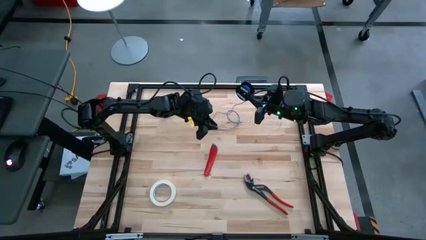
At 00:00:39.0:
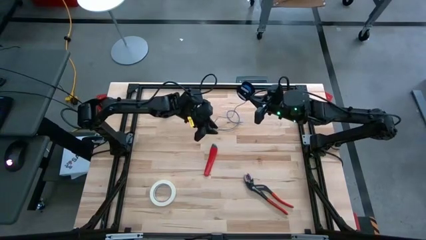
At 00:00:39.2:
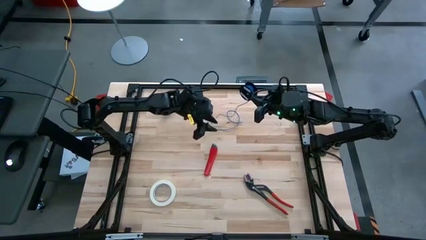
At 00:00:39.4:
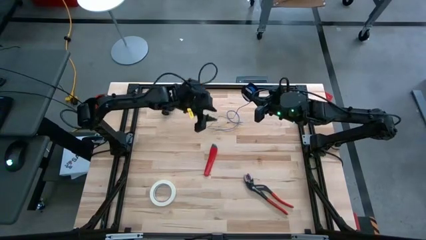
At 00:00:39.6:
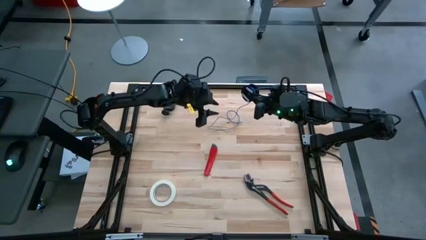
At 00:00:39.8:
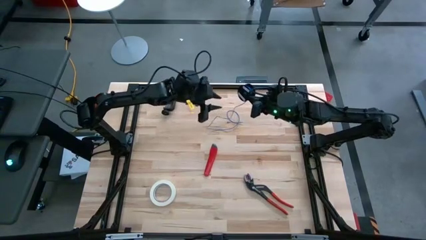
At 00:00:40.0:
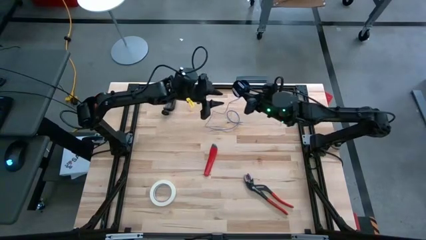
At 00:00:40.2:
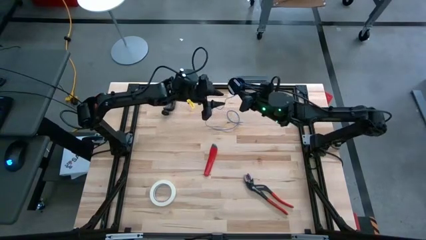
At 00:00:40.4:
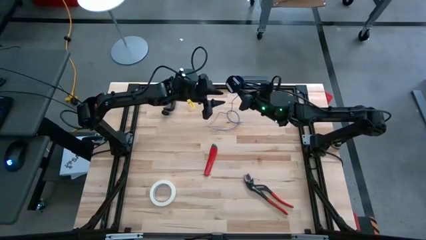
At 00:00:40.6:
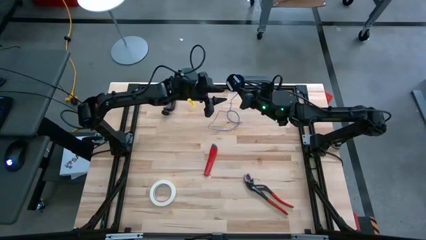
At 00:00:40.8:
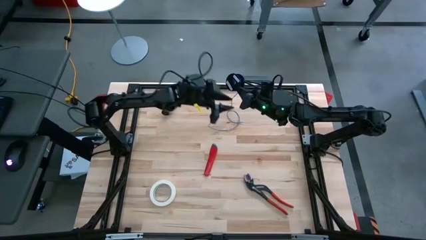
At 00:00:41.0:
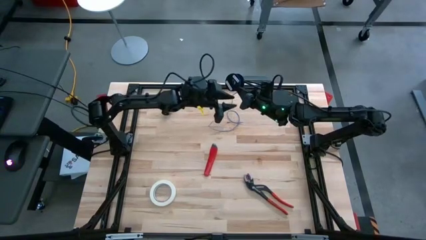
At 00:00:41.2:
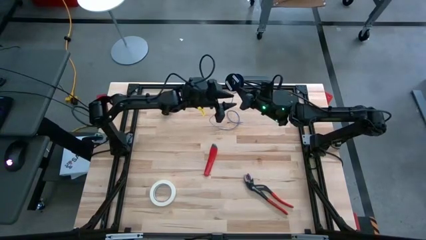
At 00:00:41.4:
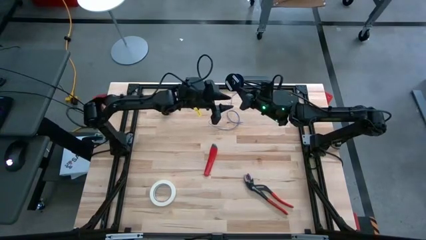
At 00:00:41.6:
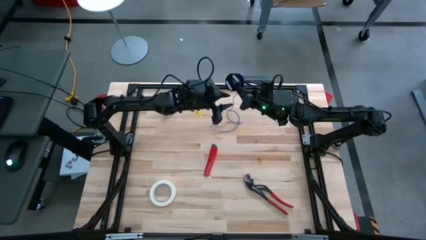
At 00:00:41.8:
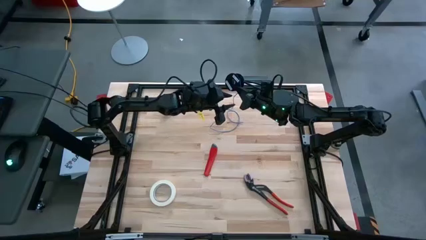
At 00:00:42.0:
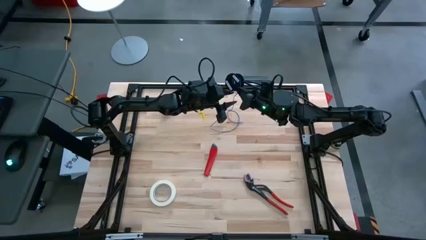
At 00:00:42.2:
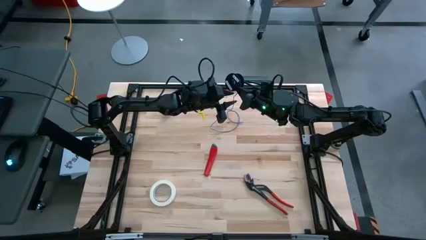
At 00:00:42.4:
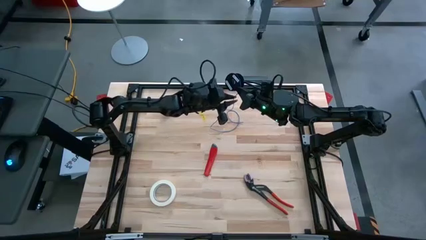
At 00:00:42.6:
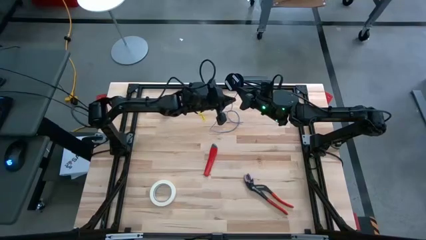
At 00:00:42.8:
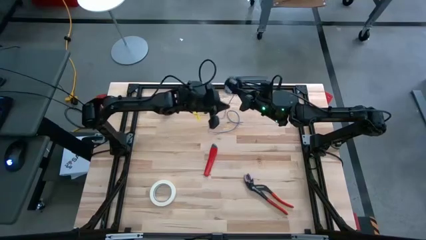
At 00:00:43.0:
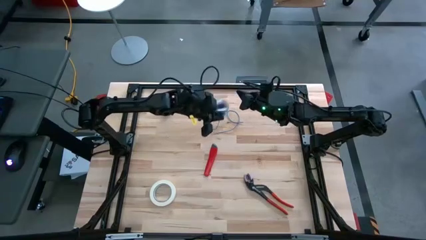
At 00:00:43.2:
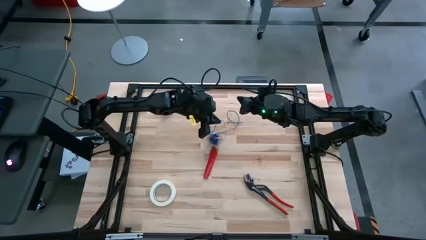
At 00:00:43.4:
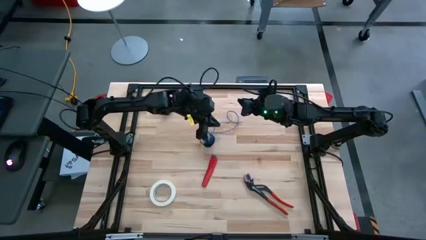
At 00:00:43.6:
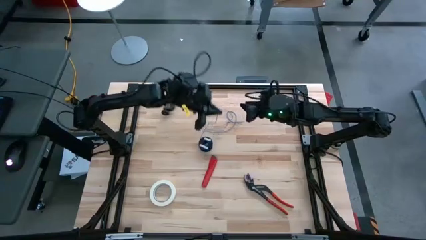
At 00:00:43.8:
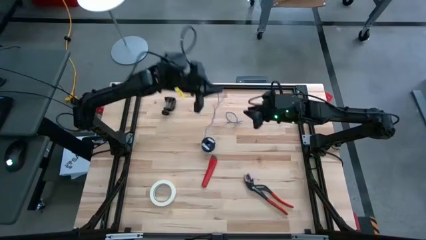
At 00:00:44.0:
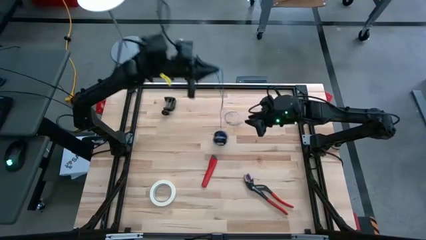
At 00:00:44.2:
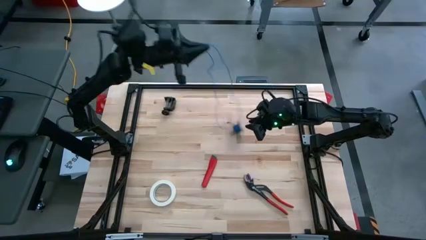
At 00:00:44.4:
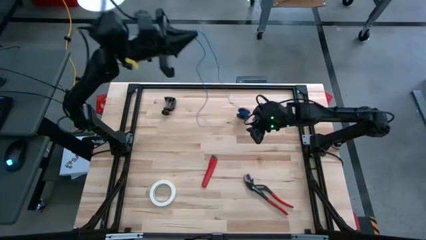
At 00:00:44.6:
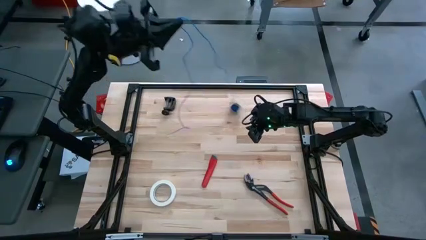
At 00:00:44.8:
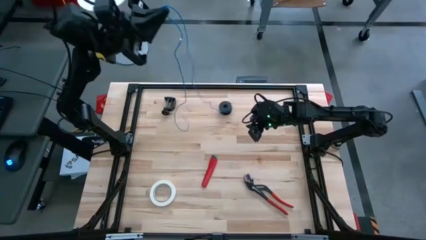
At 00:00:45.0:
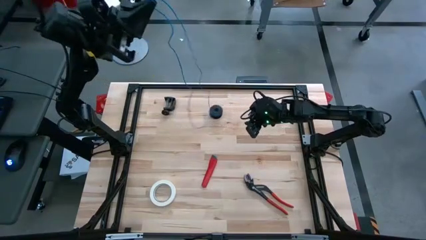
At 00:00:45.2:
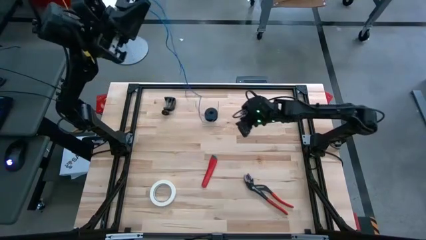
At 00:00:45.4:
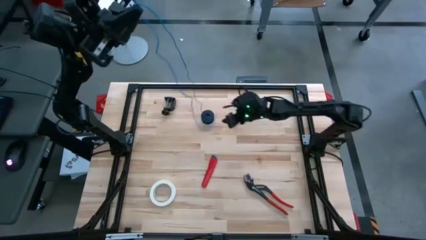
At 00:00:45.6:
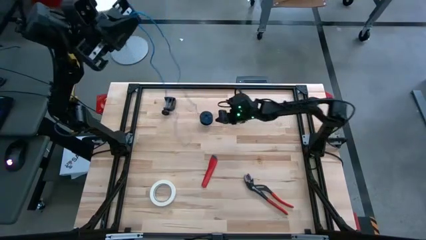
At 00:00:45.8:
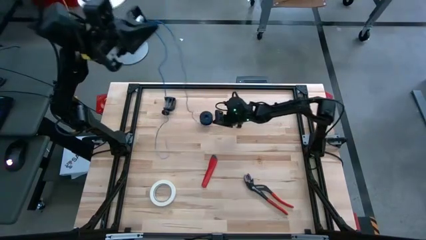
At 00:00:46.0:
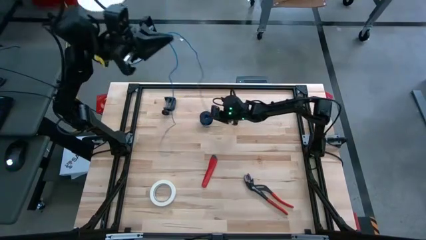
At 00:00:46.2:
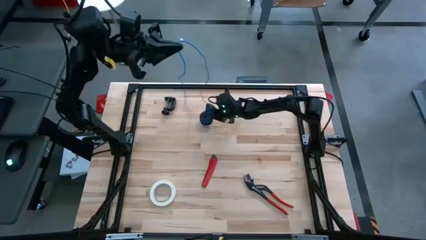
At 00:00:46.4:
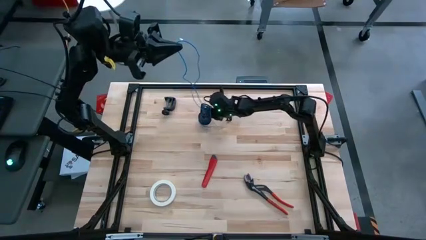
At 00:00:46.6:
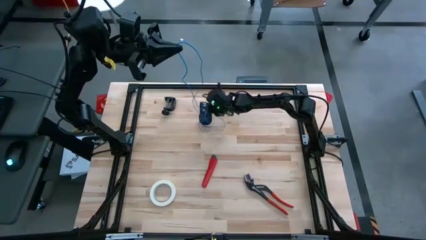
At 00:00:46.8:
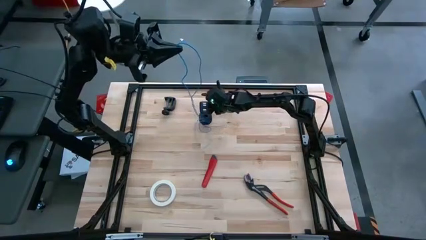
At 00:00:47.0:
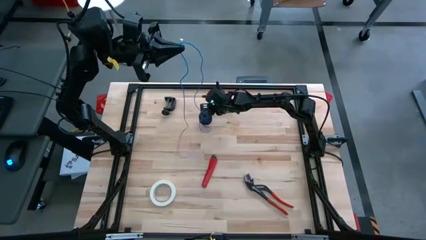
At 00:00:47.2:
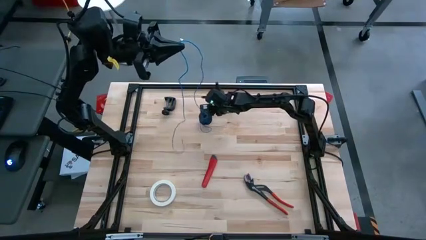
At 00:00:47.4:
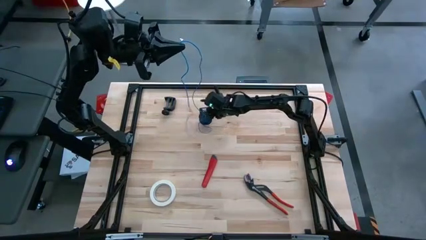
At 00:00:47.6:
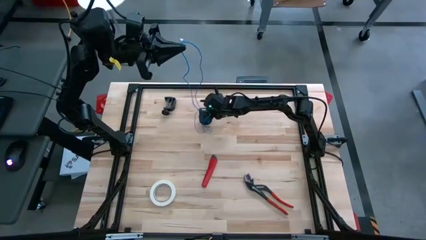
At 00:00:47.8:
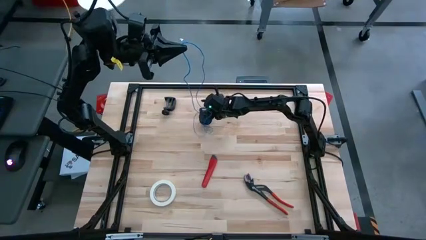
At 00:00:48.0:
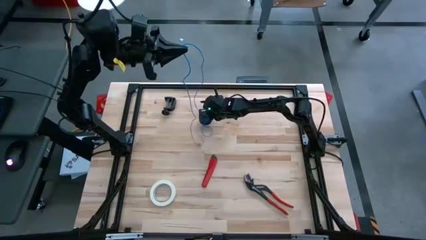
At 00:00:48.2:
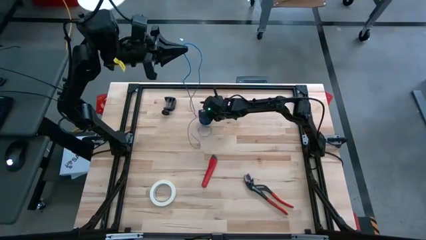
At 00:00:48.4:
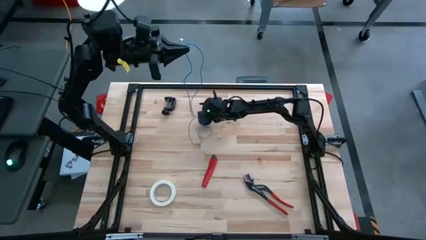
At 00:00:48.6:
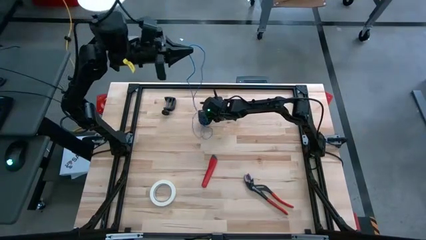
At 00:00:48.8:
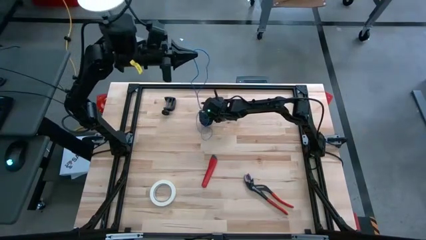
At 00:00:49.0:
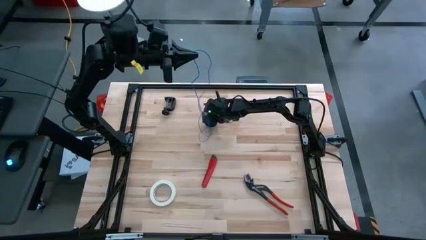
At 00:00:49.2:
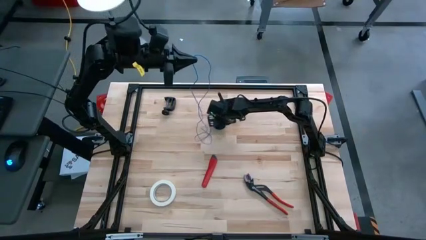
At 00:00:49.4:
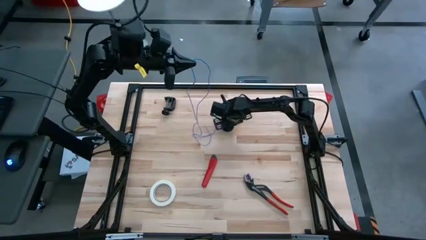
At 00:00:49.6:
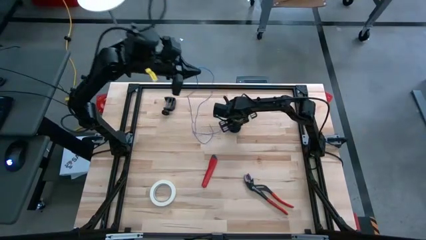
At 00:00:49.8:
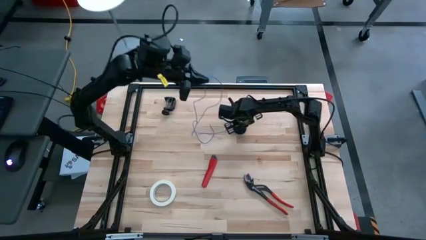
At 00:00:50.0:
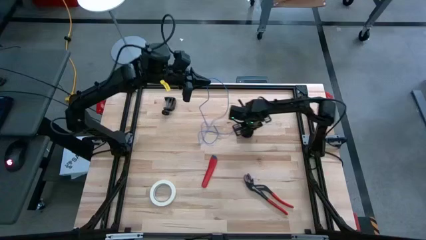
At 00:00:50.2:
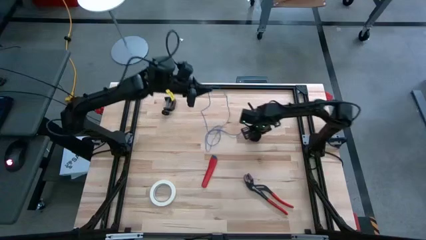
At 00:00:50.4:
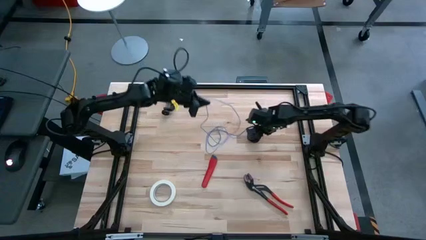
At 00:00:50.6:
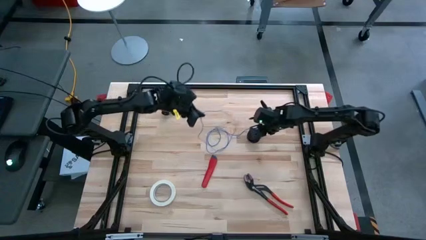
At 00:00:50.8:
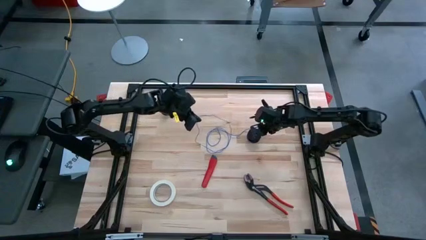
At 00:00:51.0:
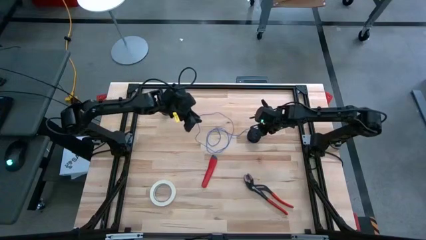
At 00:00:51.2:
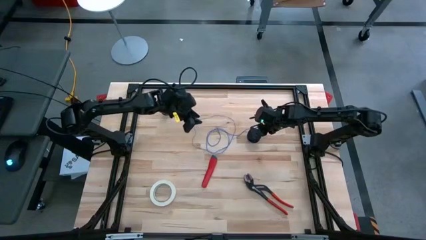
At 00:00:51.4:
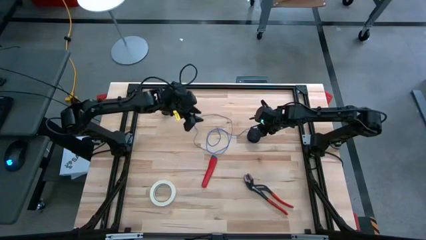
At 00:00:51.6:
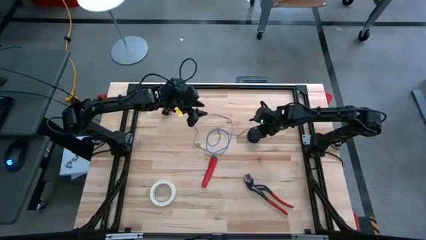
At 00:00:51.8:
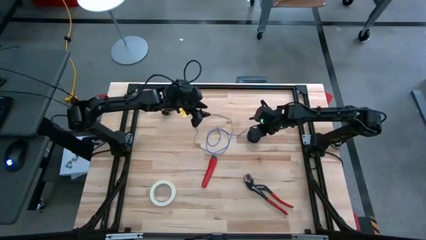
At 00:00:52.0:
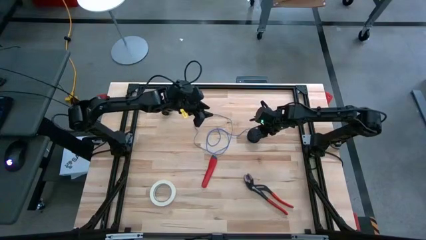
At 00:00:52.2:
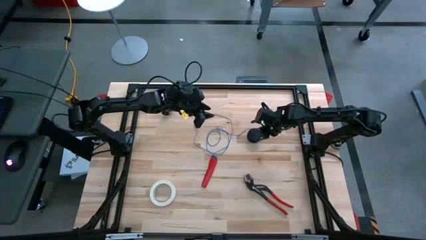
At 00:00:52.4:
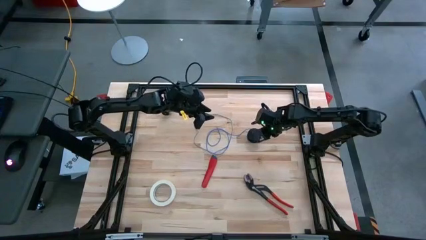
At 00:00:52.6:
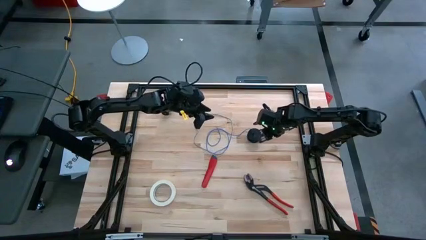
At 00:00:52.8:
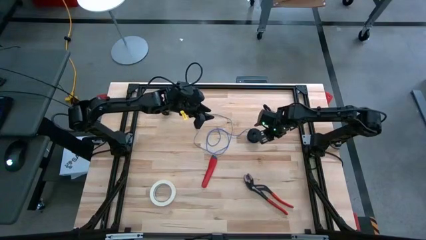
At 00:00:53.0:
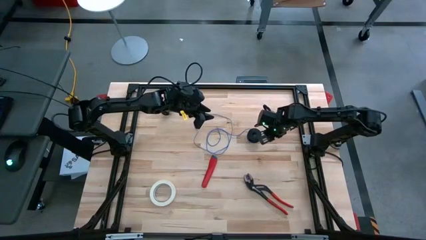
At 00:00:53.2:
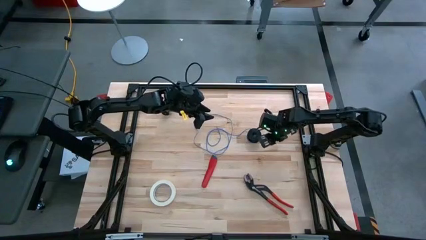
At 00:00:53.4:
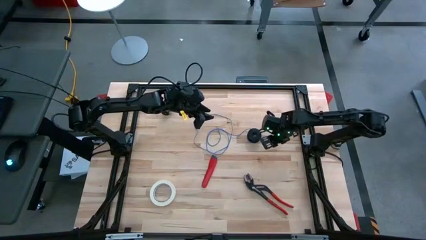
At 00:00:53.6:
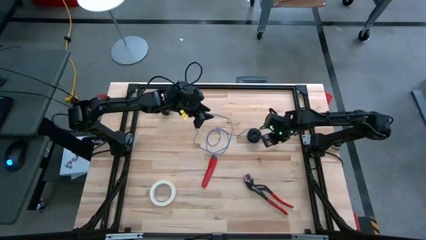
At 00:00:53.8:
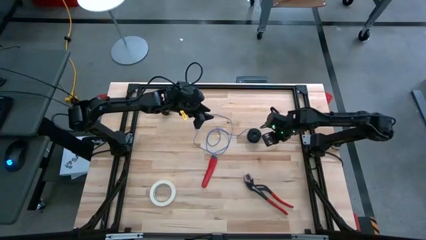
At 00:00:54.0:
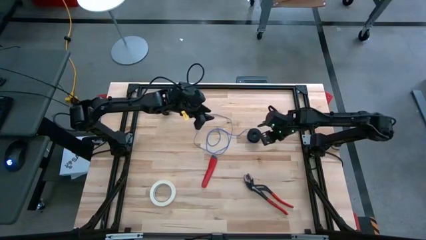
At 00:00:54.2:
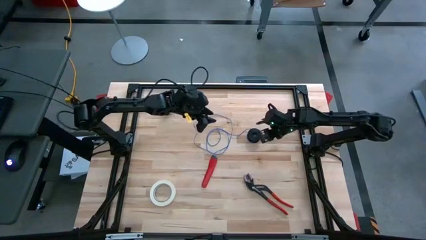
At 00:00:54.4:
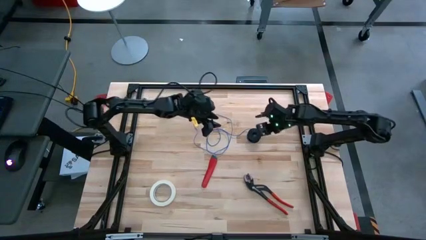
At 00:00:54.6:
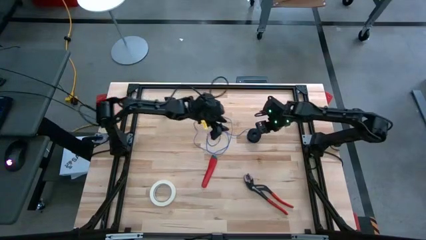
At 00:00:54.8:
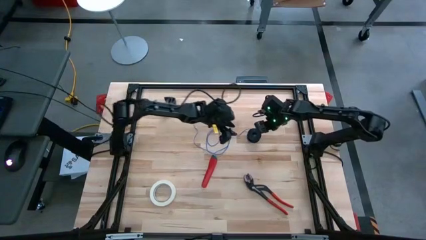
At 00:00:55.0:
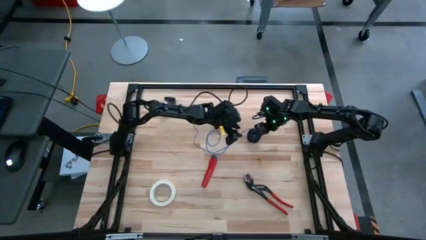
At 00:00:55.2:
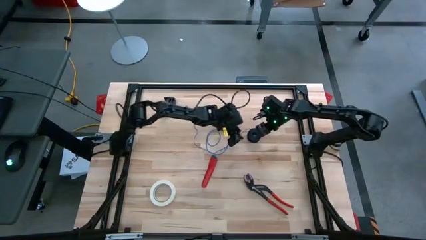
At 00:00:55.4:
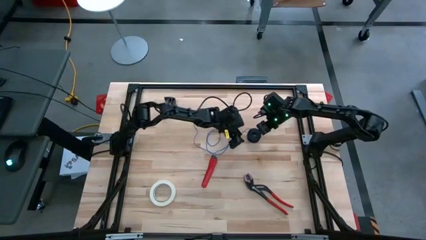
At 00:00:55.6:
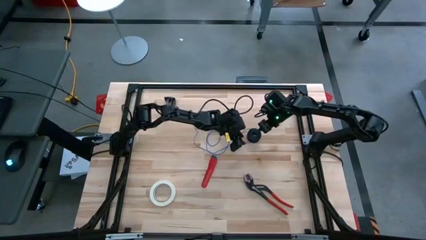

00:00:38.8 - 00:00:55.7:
Task: Coil cords
Uncoil the blue wire cable from the black spool
